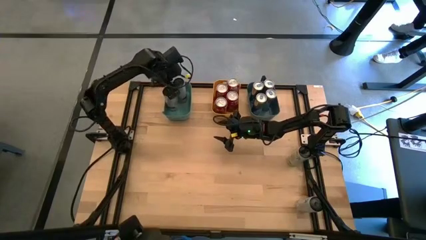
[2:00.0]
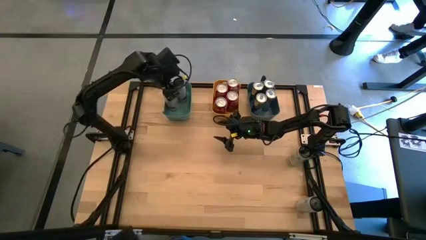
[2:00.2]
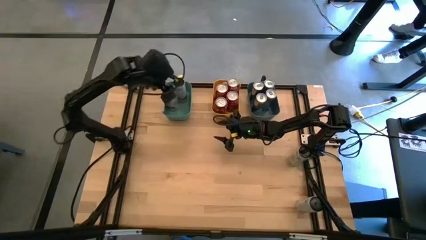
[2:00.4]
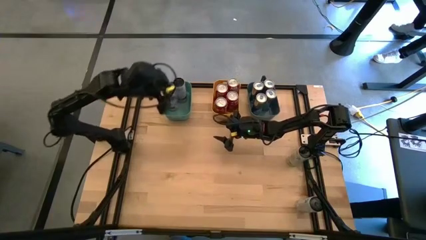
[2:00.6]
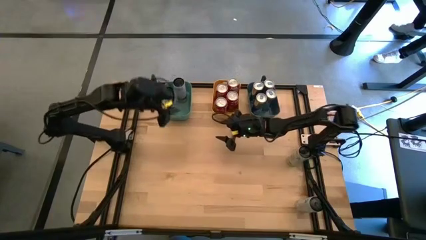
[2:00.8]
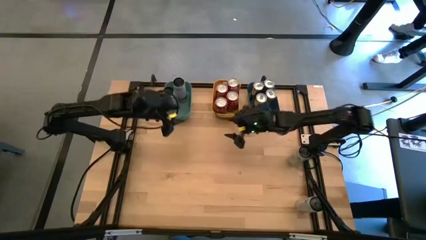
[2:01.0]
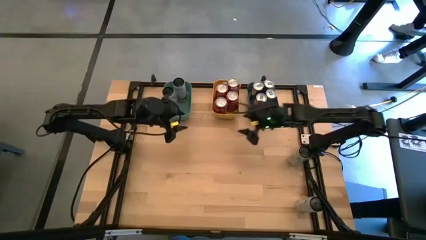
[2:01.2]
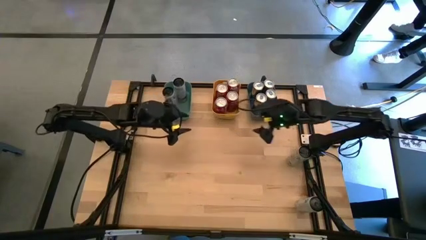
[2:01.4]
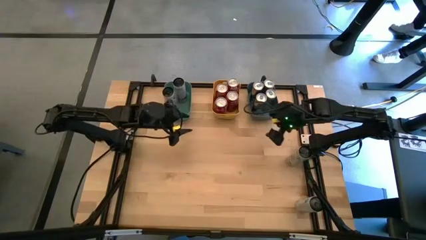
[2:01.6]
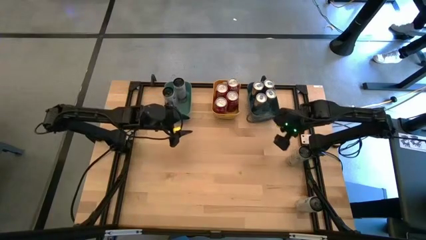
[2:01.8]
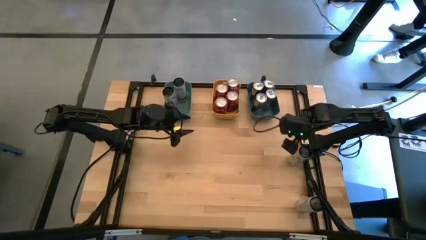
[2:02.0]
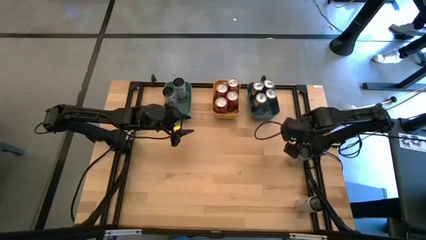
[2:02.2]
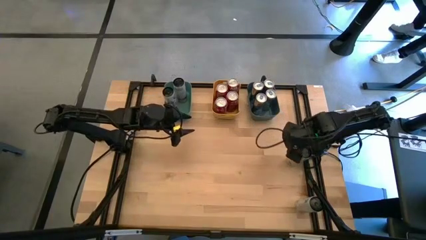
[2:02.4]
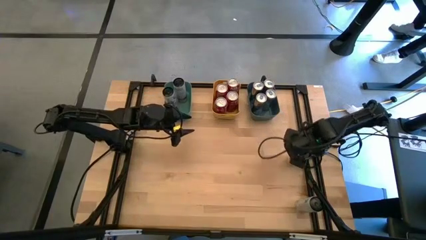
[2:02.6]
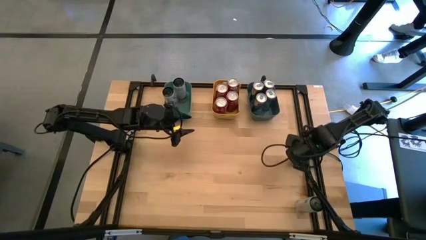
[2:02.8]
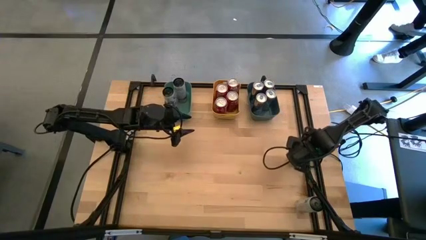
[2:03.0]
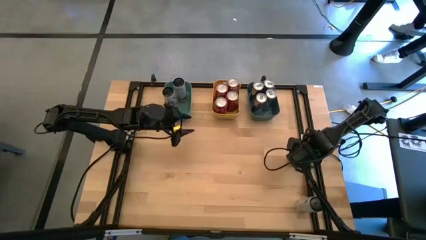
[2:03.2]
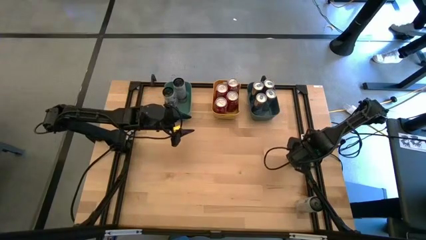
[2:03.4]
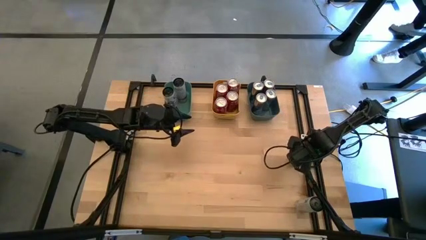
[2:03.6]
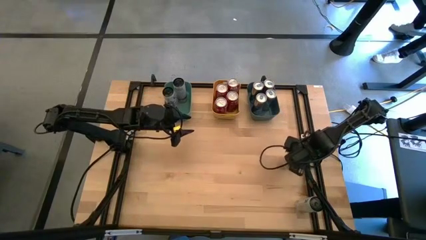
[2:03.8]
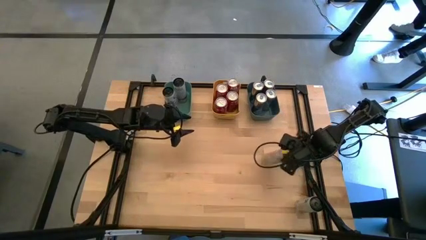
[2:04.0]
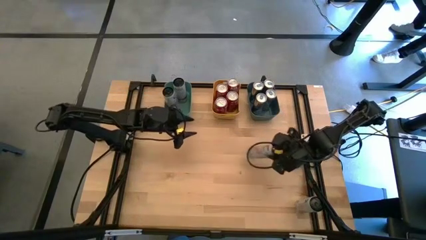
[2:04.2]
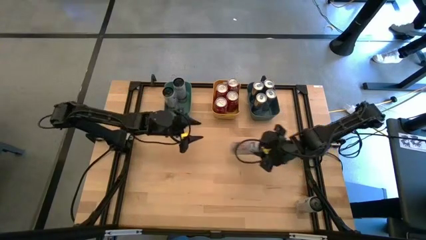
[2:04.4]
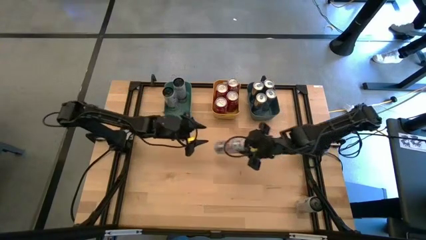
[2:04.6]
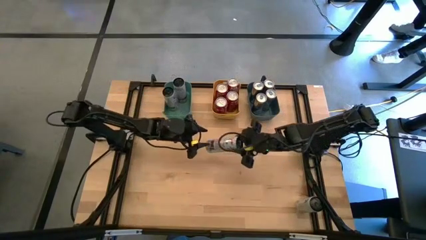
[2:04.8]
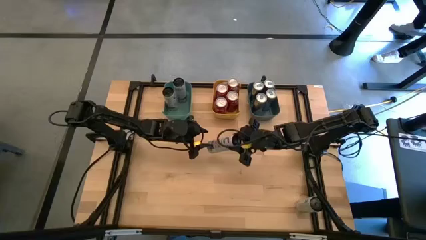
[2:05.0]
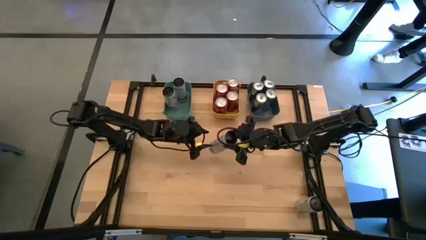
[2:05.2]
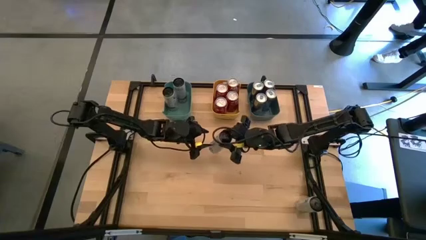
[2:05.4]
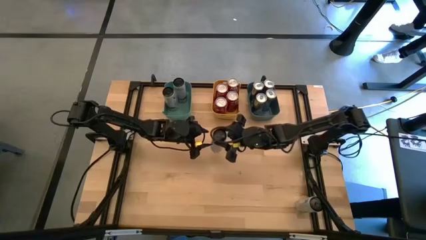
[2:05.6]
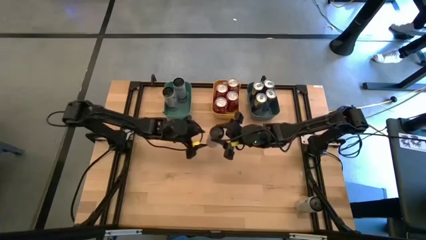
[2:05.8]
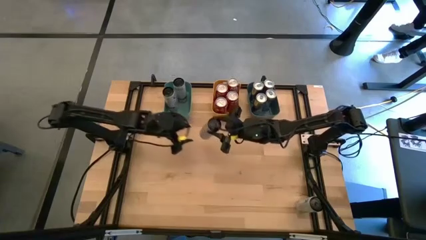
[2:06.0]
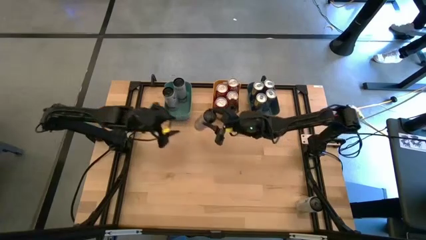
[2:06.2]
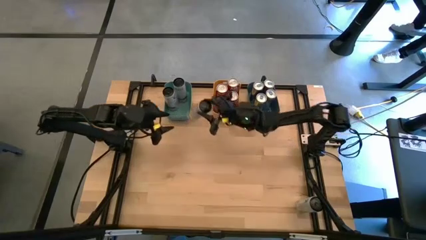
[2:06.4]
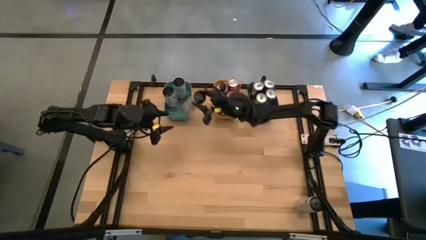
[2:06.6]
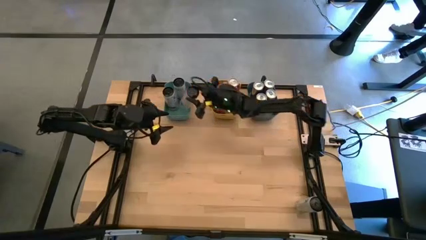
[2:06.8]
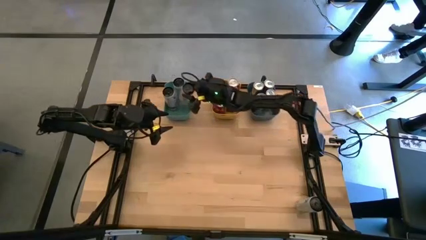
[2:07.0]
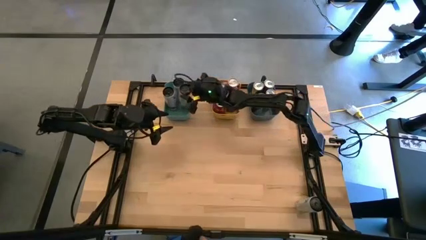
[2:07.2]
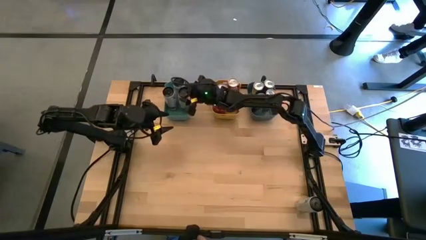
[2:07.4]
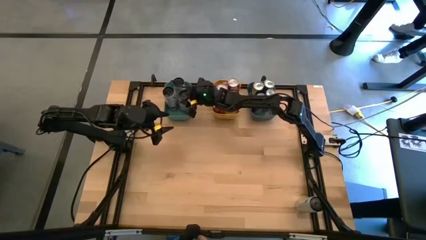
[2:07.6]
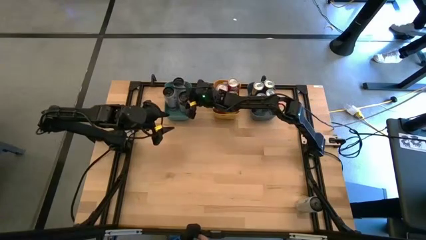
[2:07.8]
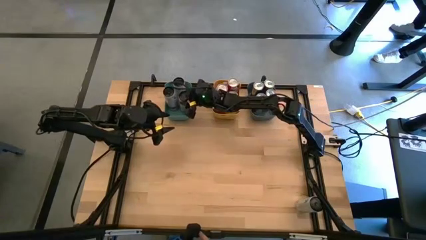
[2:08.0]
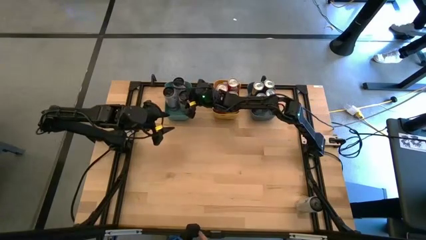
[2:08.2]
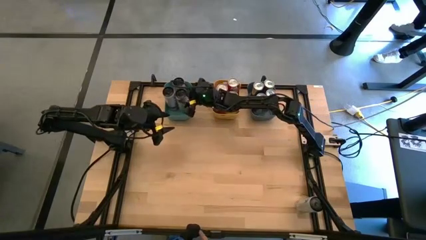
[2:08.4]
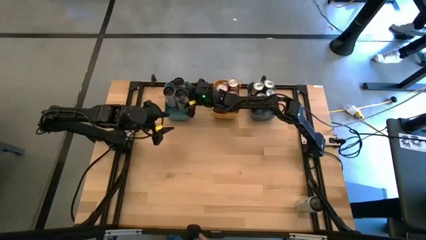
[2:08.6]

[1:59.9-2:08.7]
Task: Sort soda cans
Put the top white pink soda can into the green bin

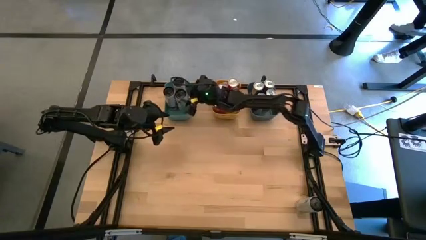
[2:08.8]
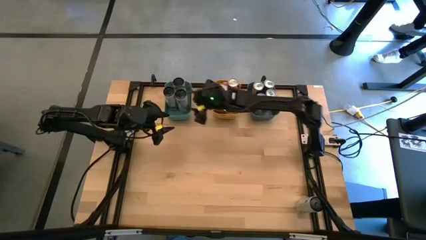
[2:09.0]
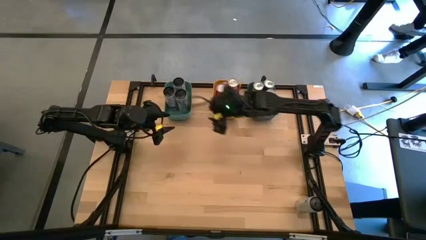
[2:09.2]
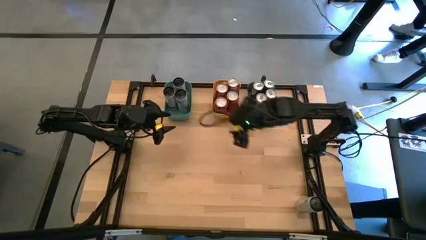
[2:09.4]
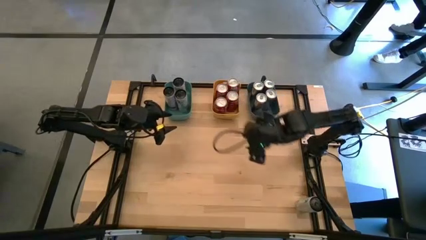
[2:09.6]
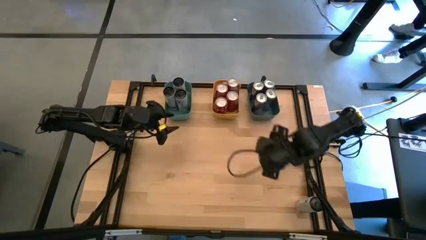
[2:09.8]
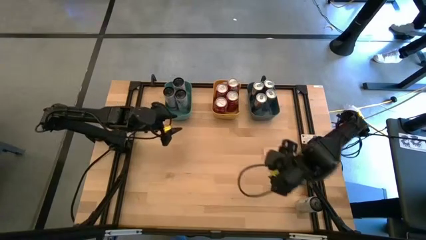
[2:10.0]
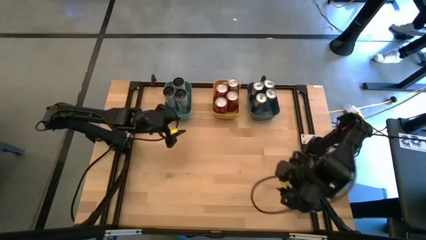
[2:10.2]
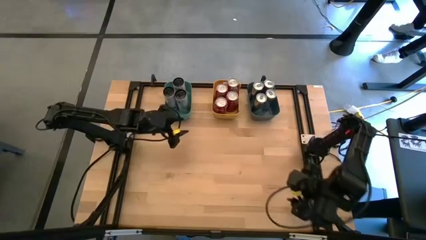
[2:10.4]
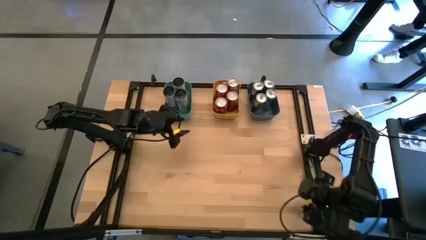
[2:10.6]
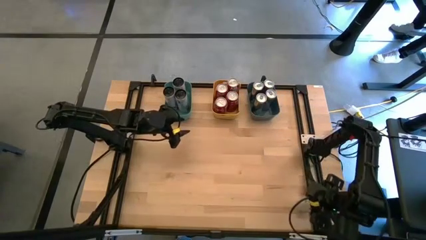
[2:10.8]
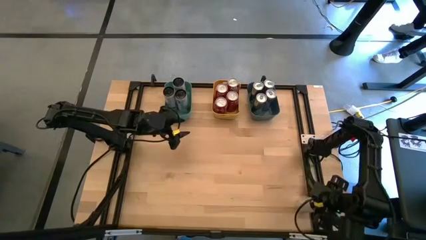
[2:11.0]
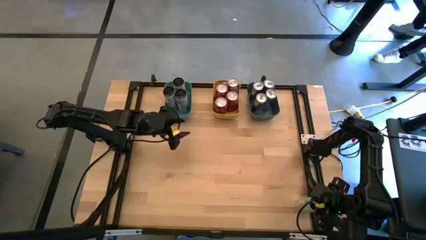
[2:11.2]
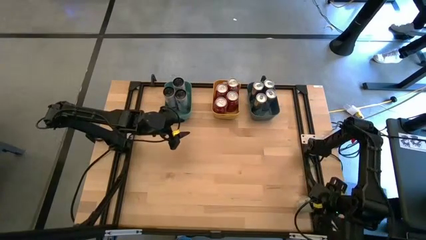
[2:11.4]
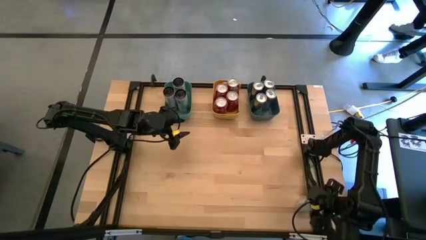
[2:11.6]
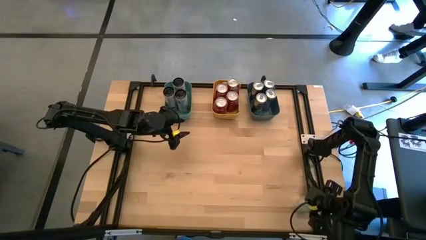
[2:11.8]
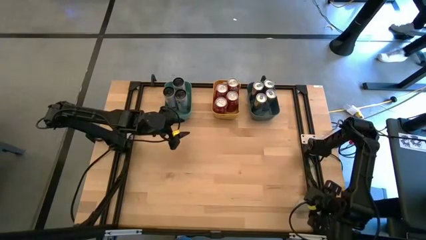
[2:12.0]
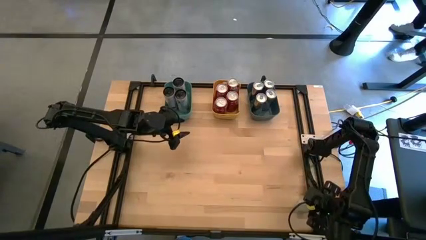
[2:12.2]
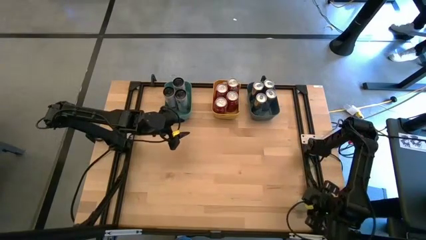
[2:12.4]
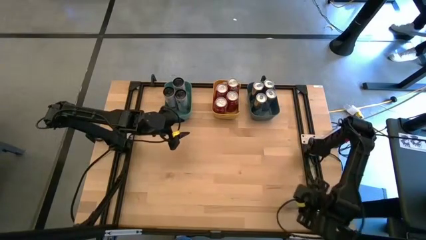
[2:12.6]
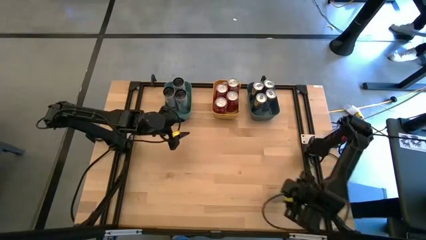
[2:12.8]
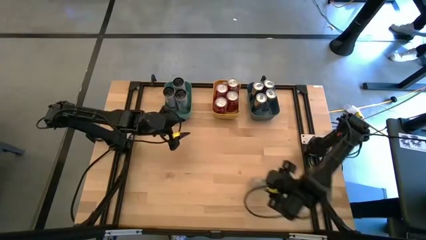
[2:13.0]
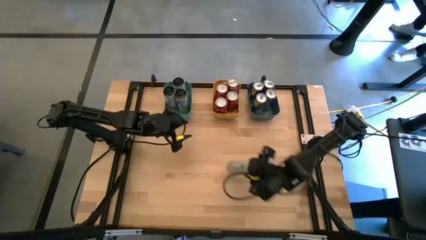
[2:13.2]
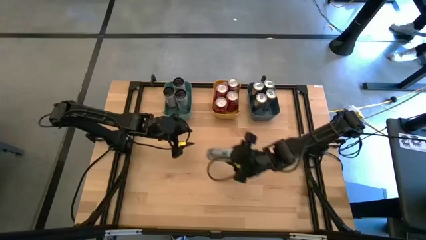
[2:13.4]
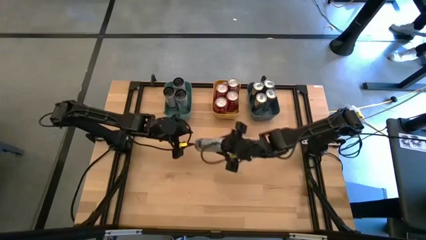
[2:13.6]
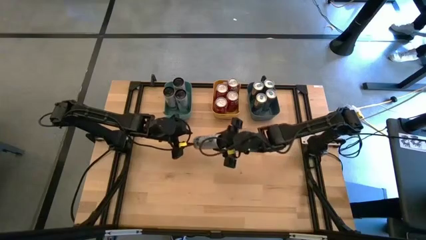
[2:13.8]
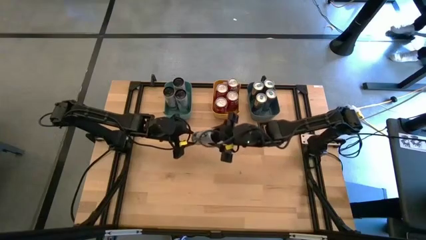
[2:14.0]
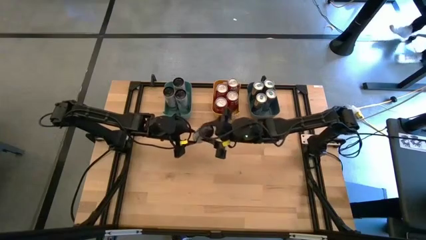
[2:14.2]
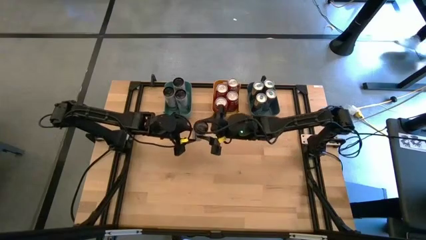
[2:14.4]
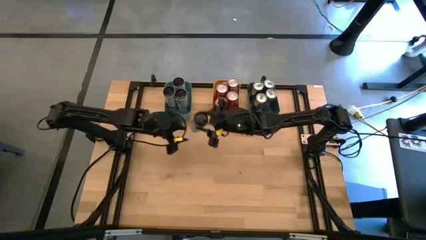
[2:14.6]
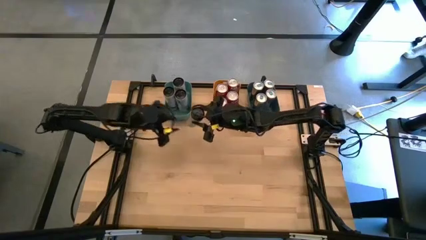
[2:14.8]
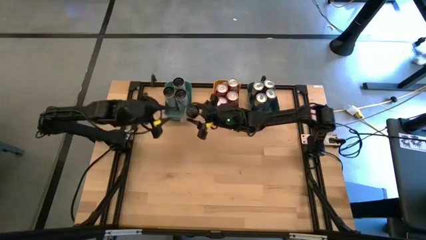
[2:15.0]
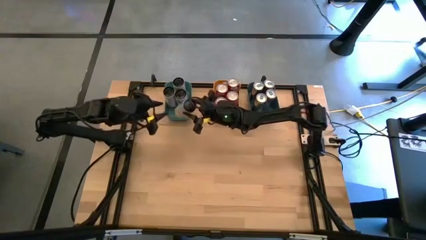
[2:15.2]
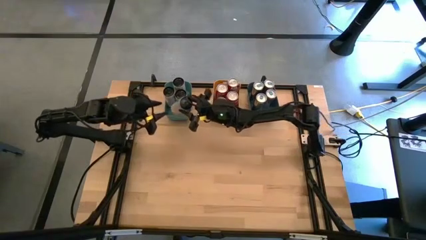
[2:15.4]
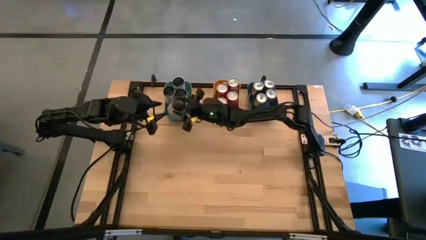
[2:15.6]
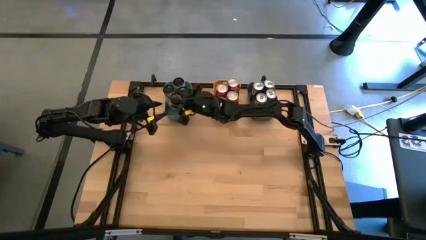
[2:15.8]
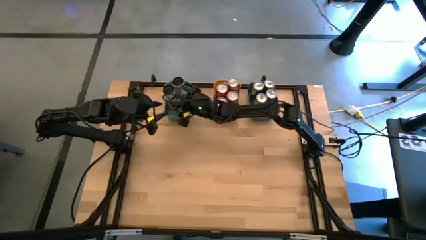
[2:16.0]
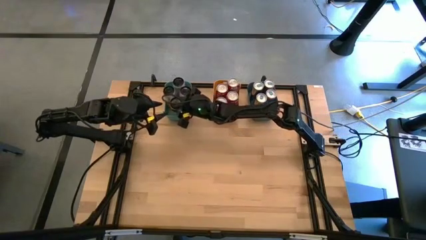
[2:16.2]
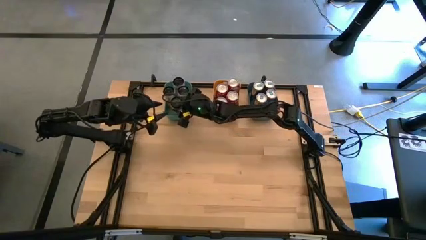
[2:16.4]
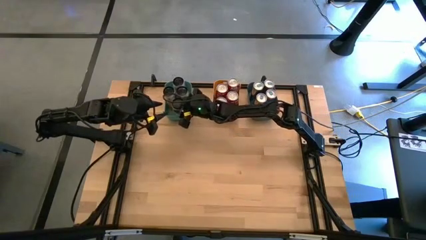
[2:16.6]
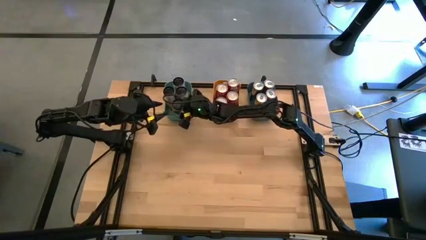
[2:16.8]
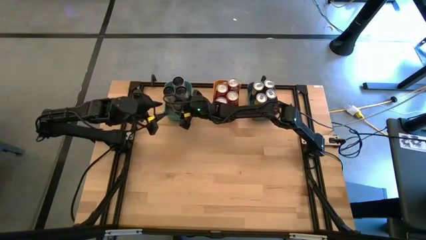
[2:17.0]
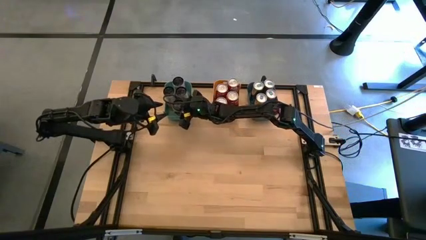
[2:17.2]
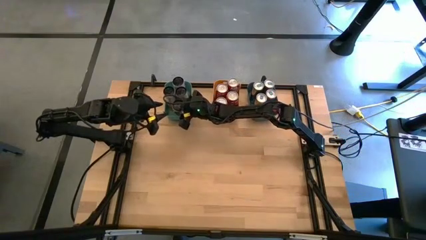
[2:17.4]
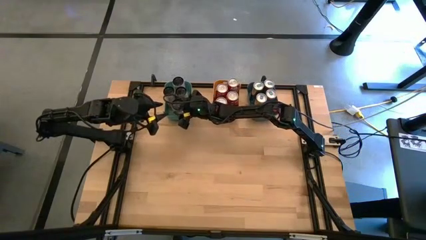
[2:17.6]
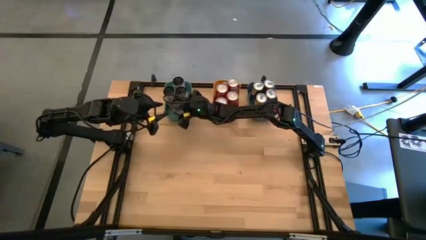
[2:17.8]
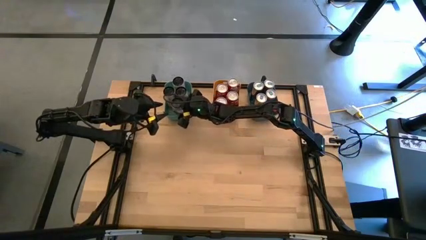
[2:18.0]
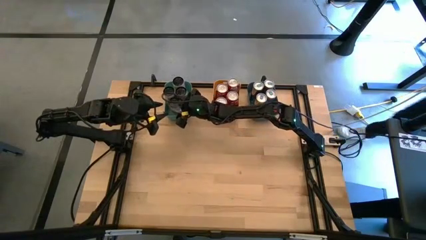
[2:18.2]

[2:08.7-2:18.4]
Put the white pink soda can into the green bin
